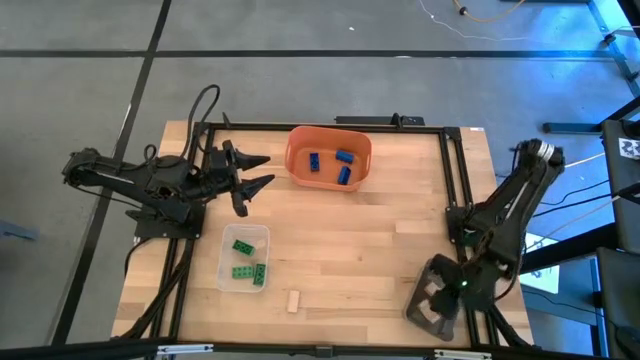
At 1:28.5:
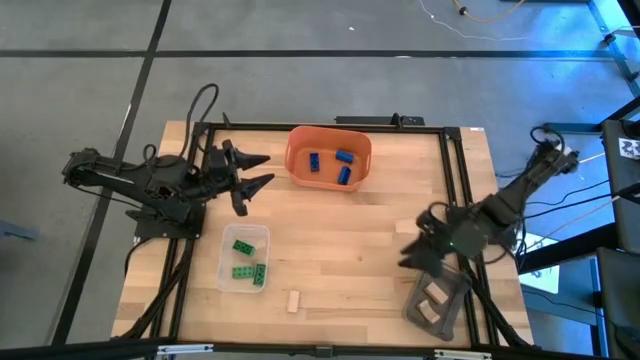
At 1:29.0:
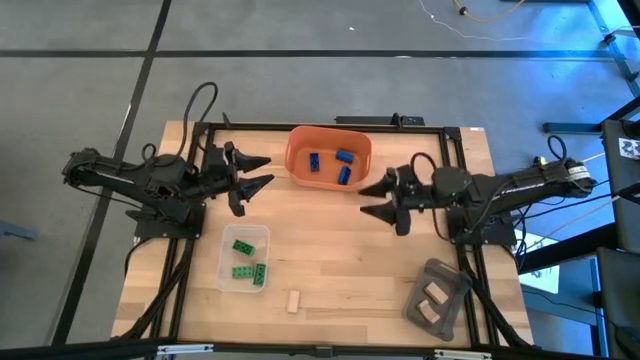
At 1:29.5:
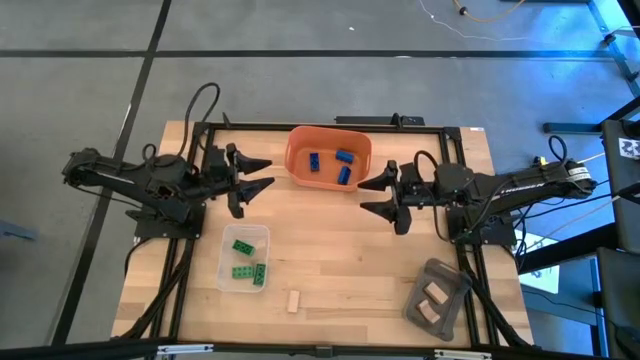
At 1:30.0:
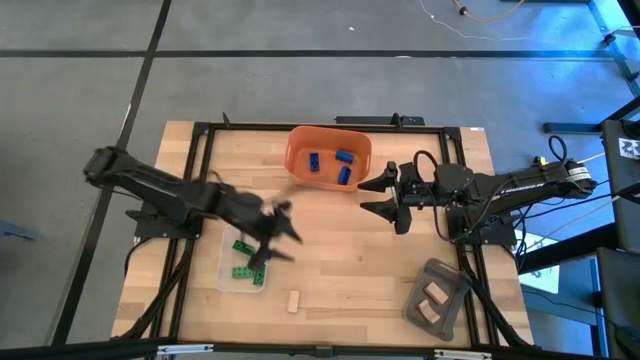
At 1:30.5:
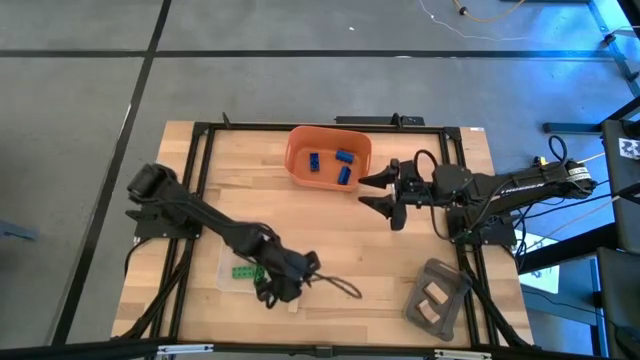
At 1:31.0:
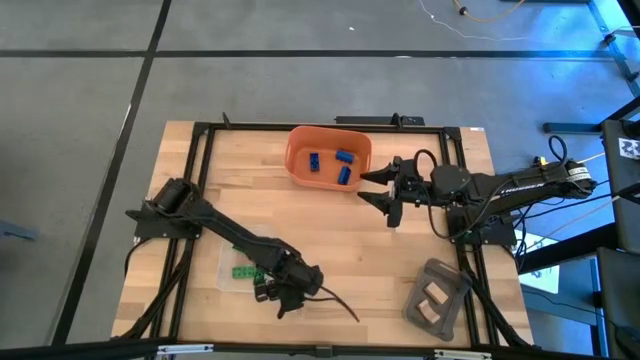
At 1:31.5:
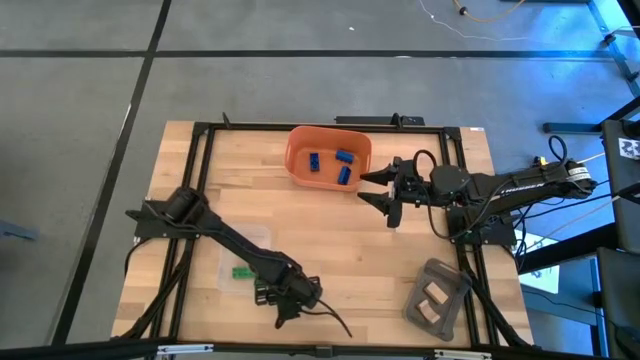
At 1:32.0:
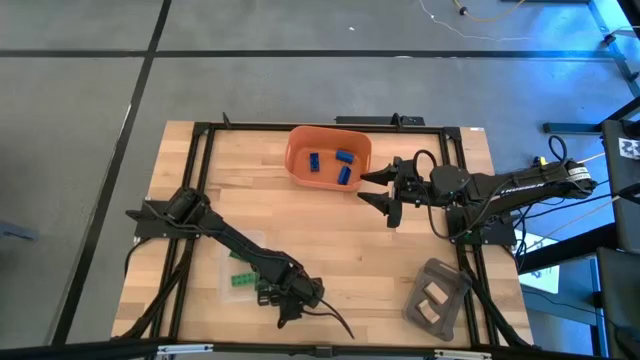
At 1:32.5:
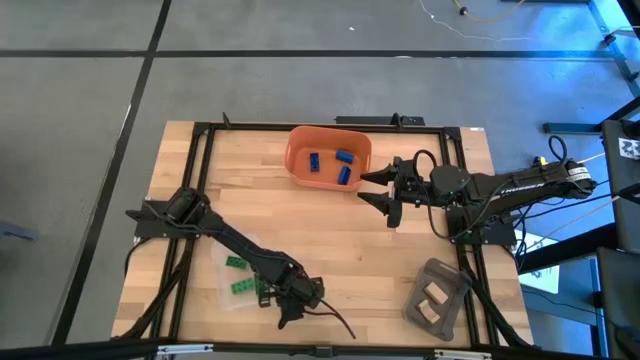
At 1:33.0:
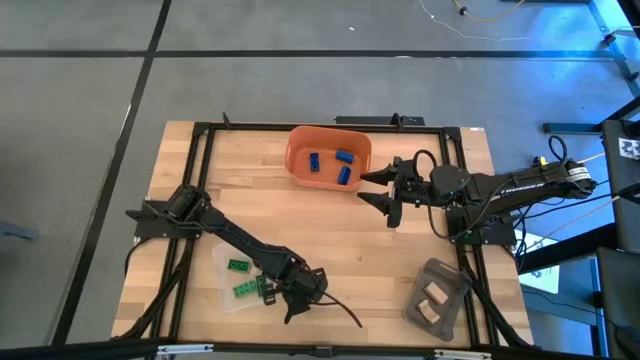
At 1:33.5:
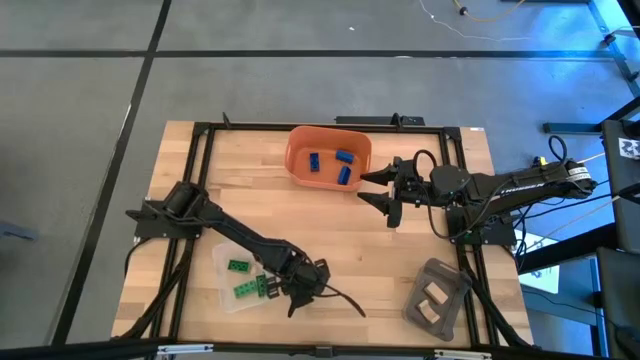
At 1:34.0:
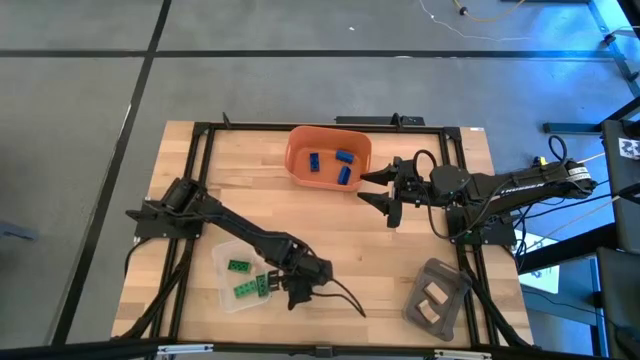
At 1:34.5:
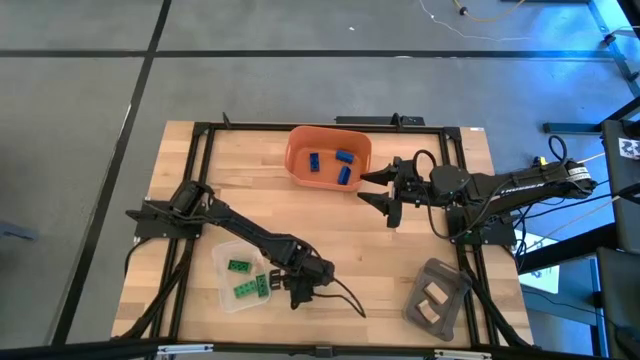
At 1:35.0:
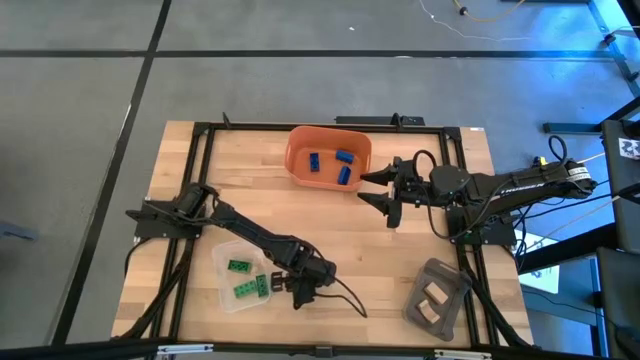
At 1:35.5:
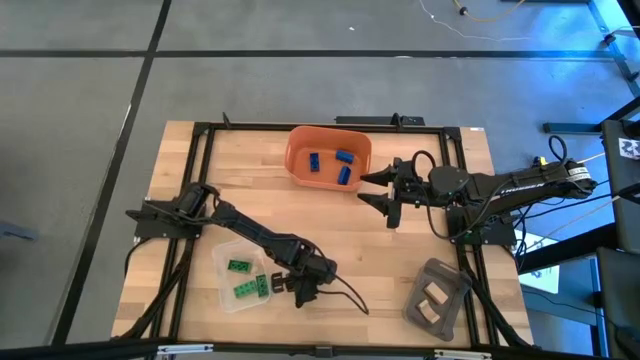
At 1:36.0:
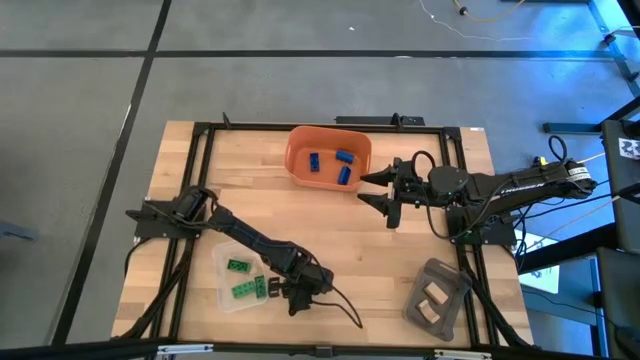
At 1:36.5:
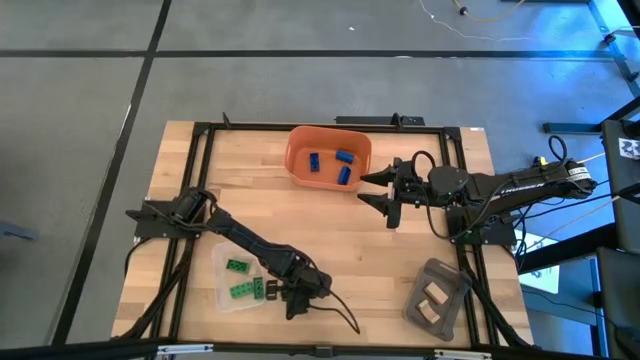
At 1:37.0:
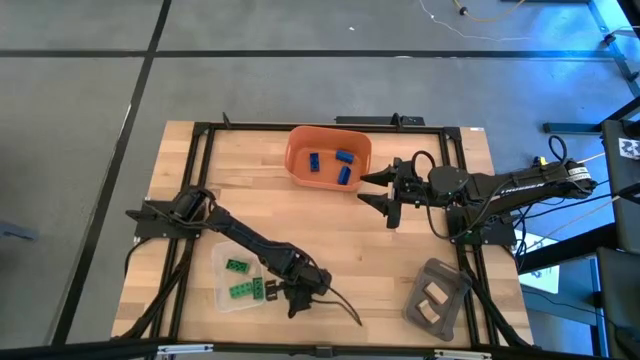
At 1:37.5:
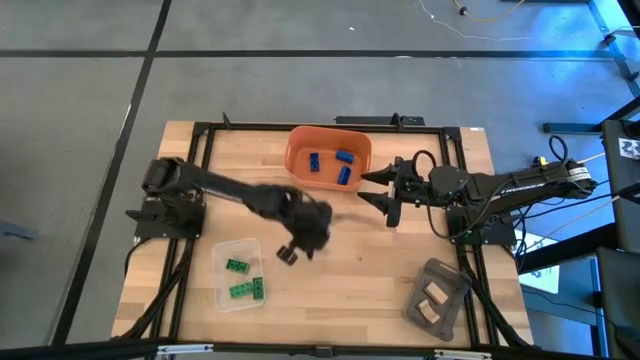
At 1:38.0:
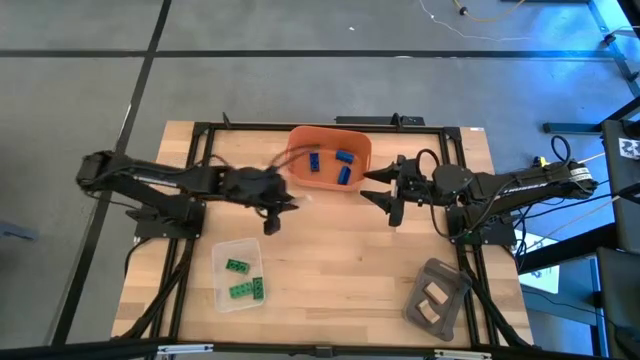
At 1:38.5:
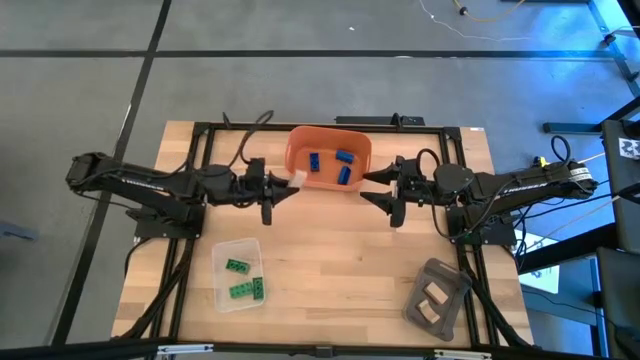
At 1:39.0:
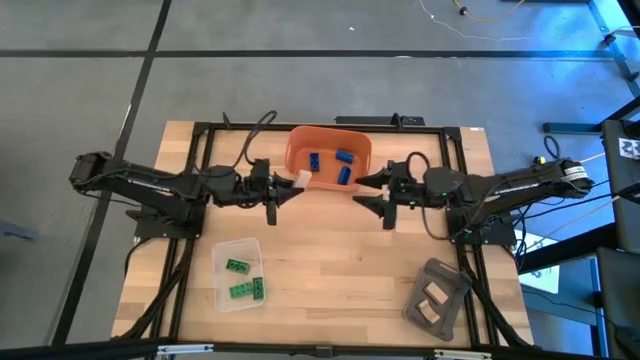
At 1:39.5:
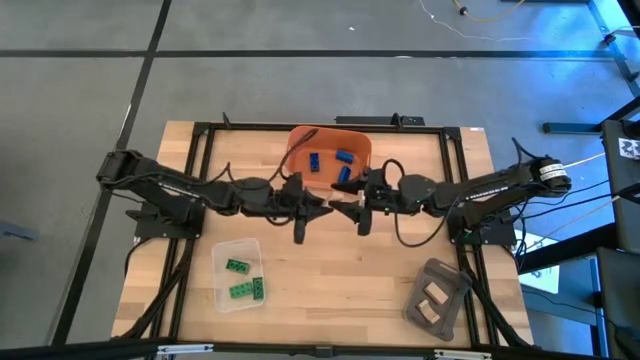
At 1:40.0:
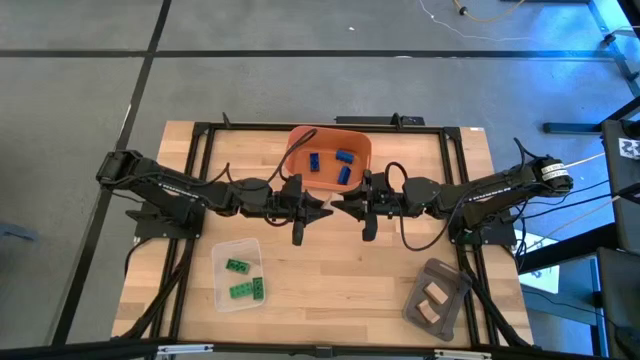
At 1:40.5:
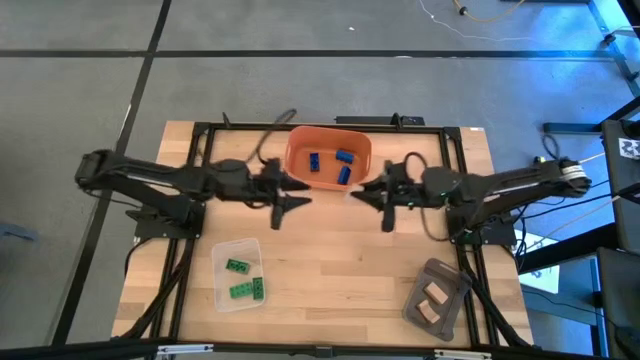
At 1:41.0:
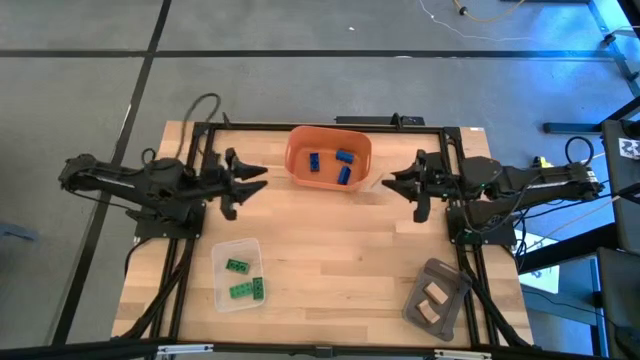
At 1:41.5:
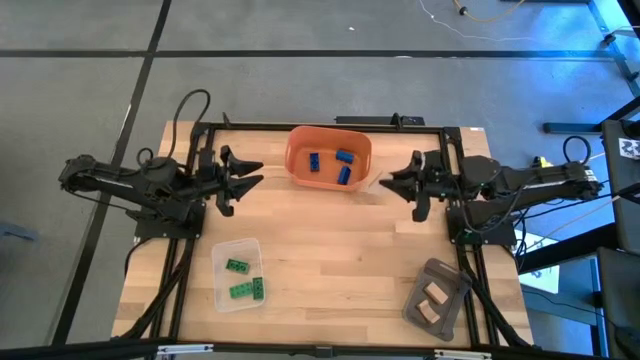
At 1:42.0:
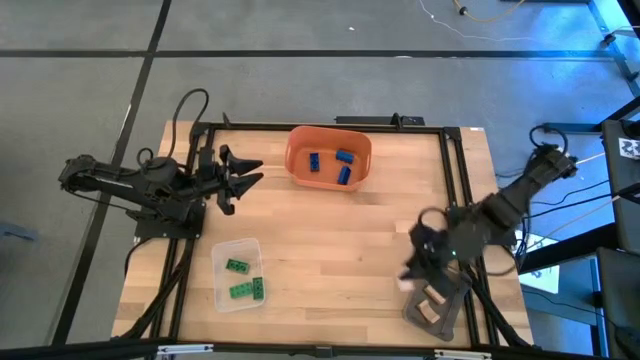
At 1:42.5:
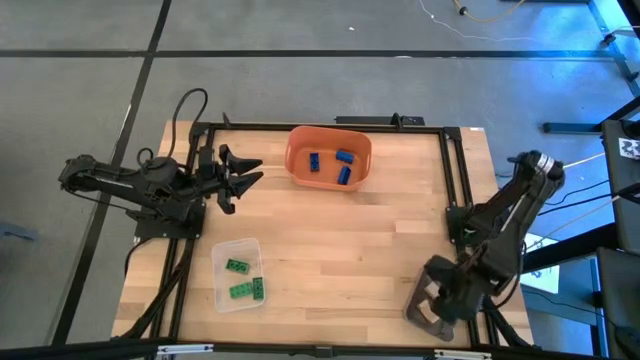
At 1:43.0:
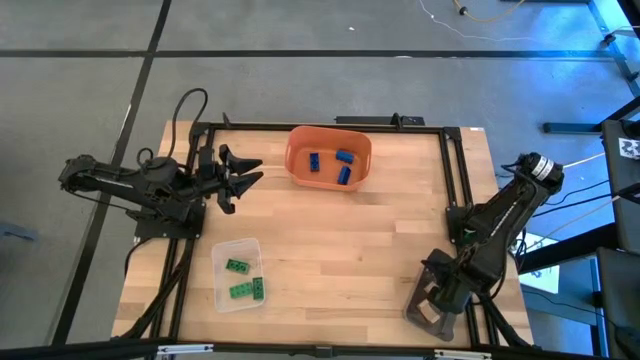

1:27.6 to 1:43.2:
Task: Sort & place blocks by color
Put the brown block into the black bin

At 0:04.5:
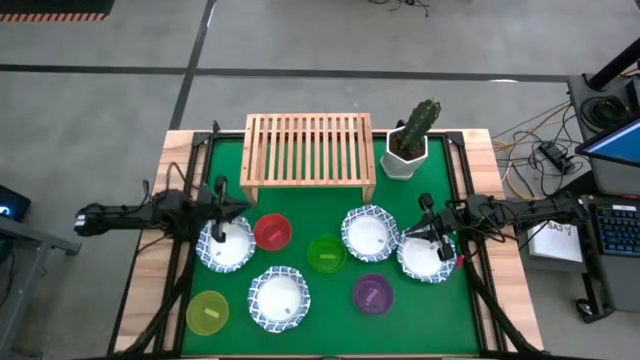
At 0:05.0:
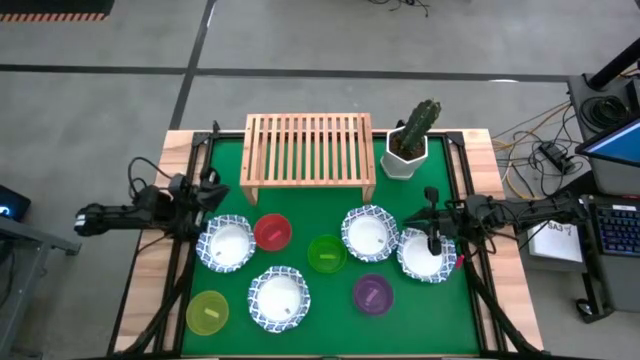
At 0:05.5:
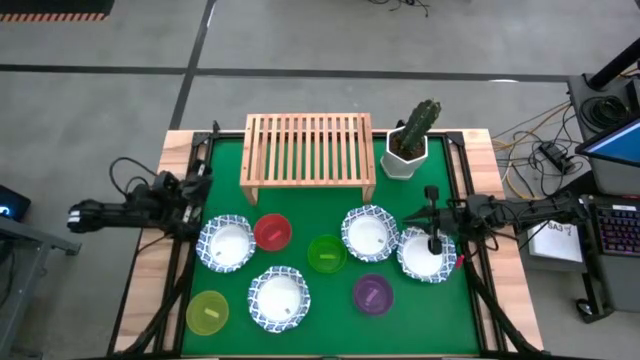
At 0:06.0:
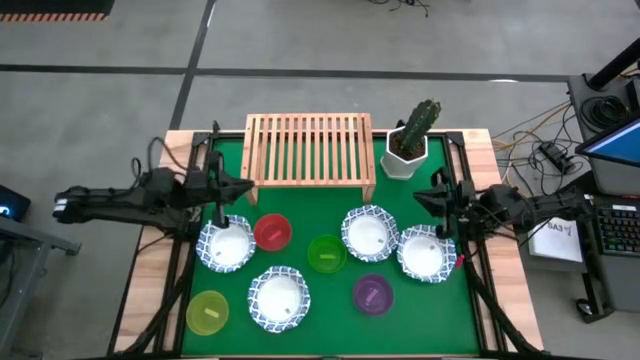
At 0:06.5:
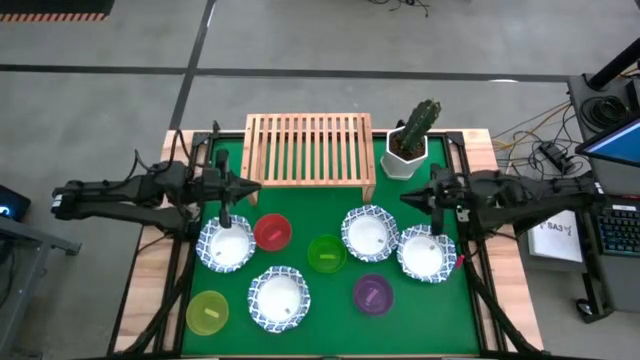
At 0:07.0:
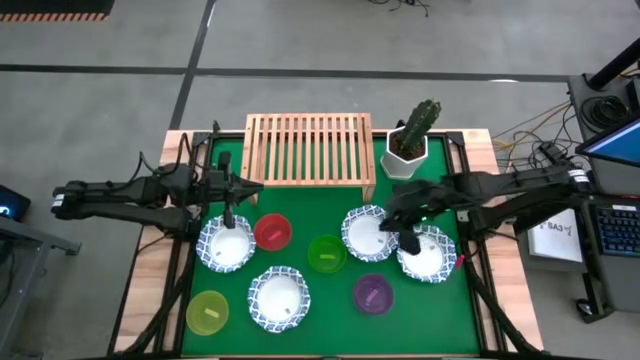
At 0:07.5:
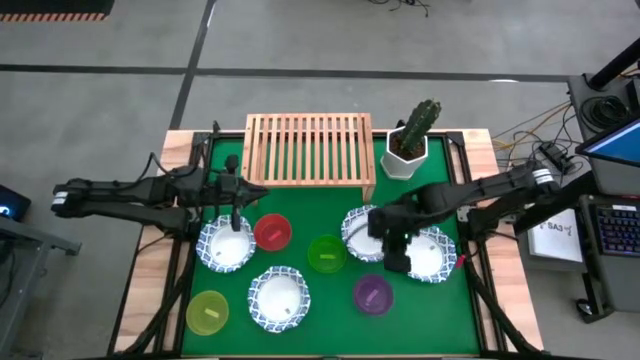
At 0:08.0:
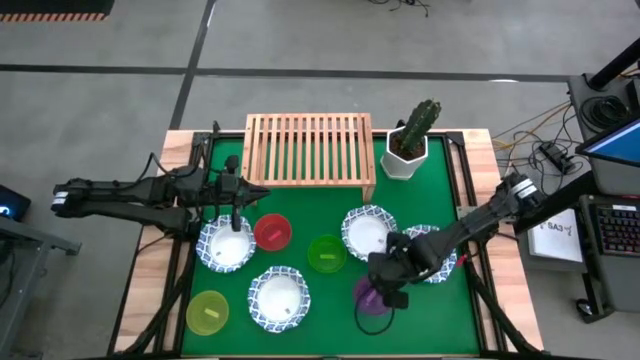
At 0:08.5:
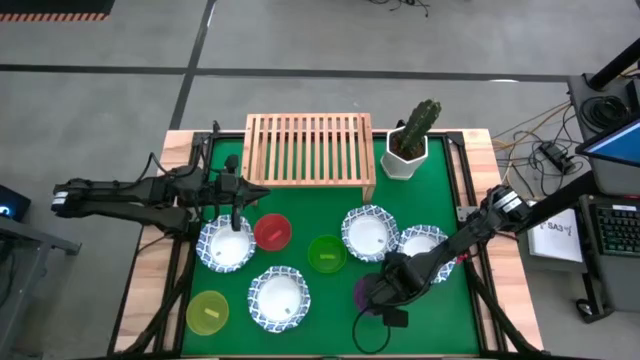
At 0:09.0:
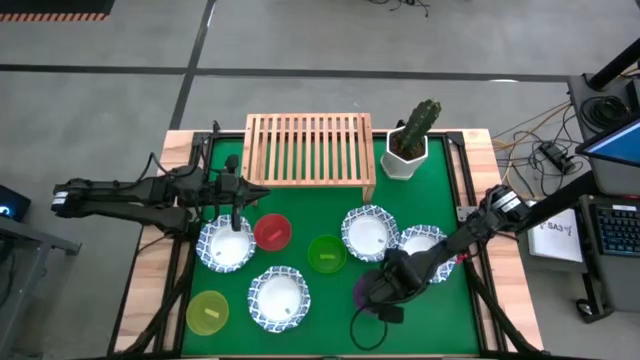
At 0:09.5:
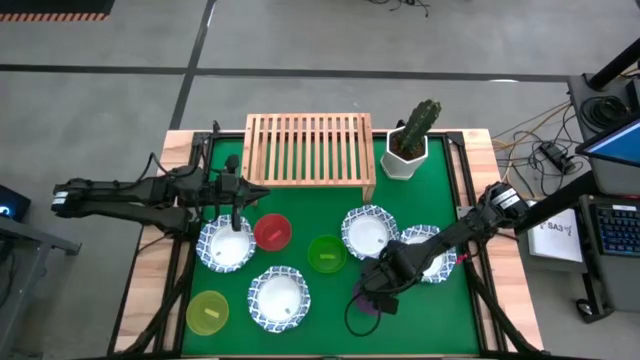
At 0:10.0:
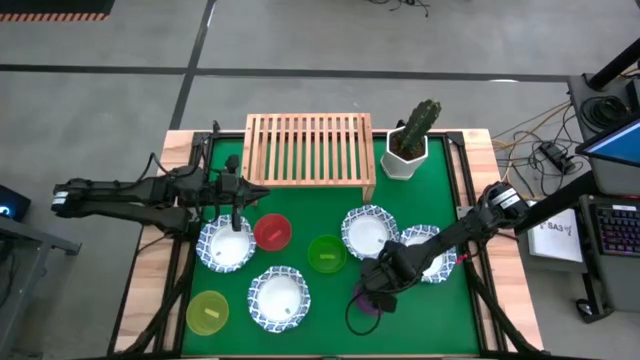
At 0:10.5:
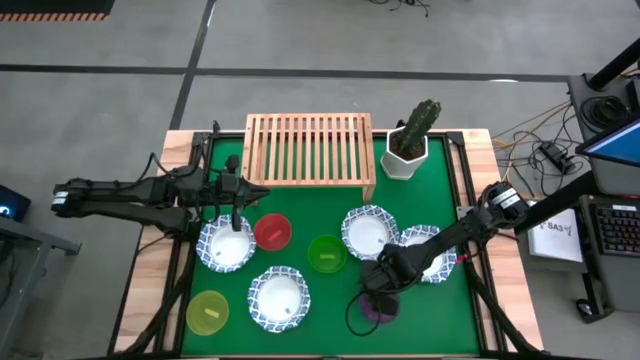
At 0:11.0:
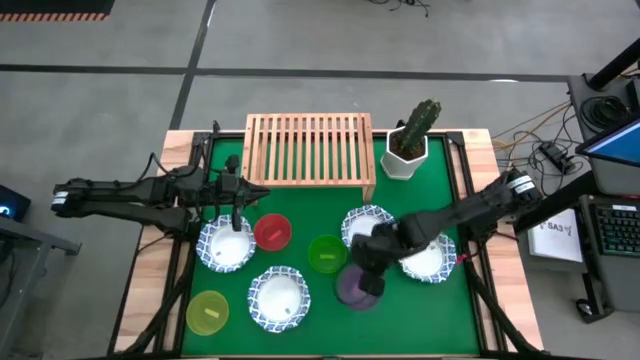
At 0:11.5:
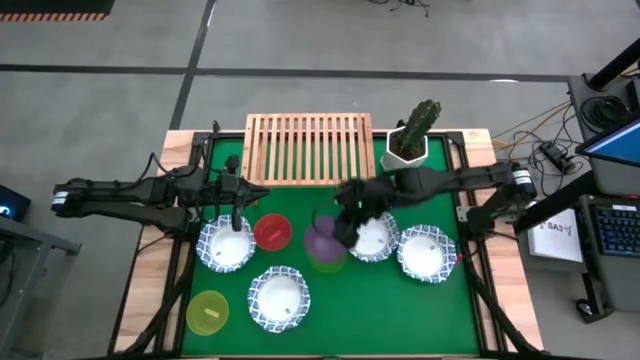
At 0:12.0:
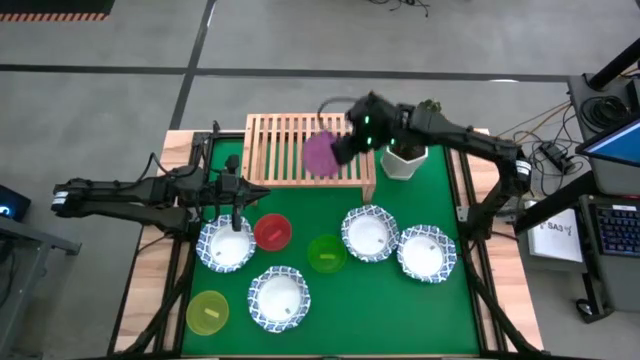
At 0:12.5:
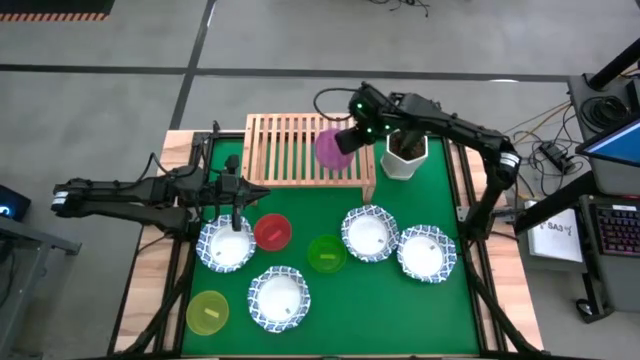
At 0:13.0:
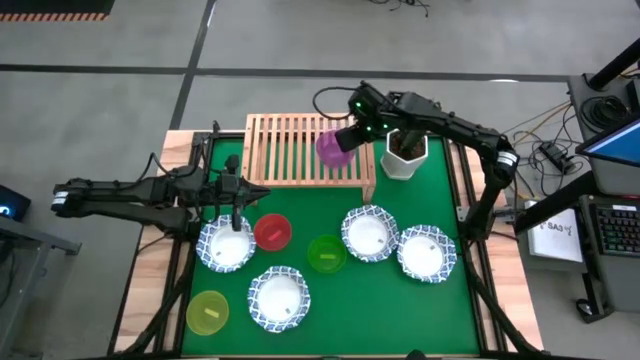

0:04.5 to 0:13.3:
Task: Place and stack bowls onto a shelf
Put the small purple bowl on the shelf
